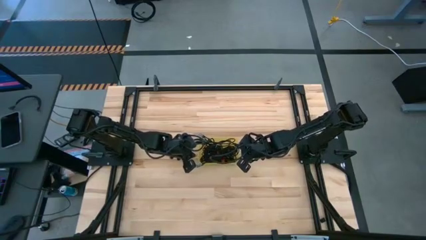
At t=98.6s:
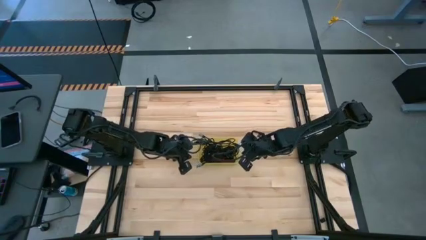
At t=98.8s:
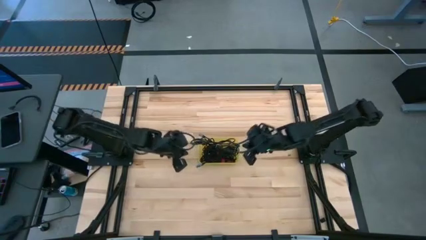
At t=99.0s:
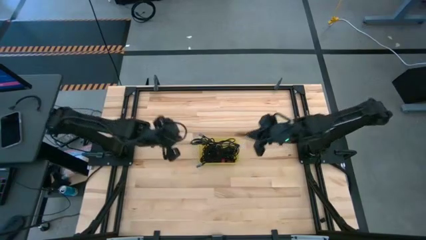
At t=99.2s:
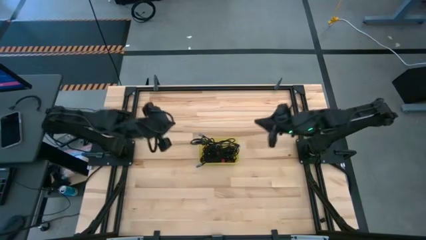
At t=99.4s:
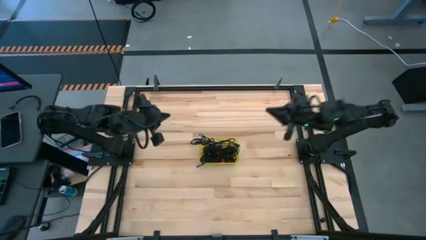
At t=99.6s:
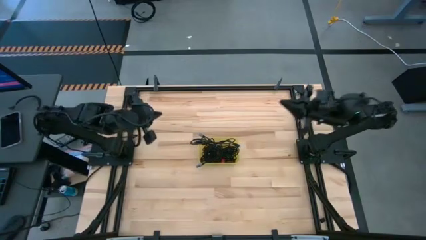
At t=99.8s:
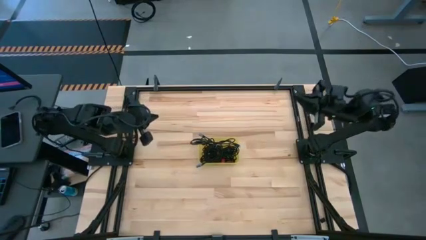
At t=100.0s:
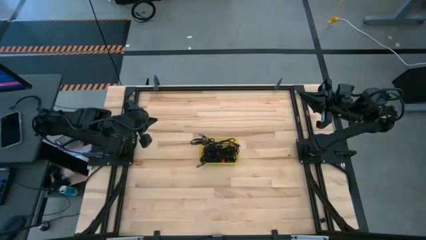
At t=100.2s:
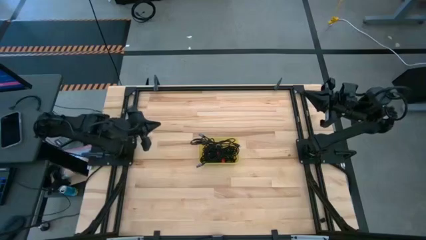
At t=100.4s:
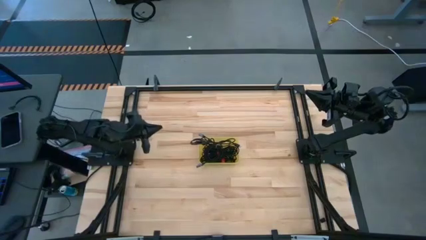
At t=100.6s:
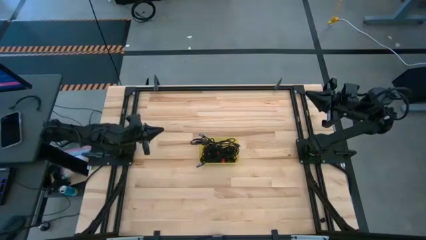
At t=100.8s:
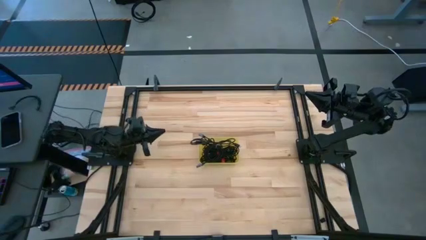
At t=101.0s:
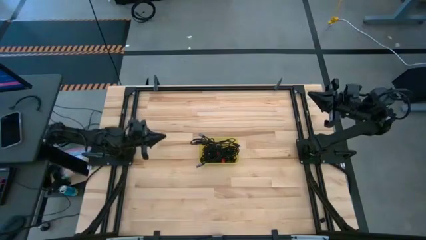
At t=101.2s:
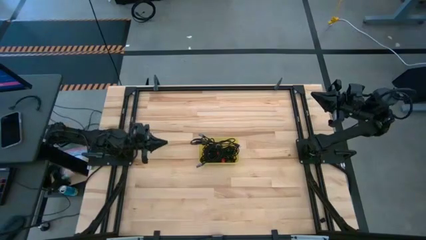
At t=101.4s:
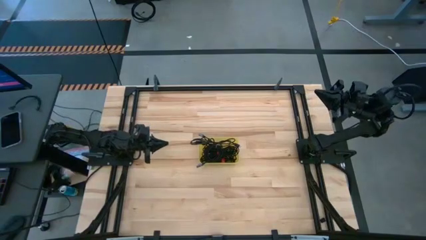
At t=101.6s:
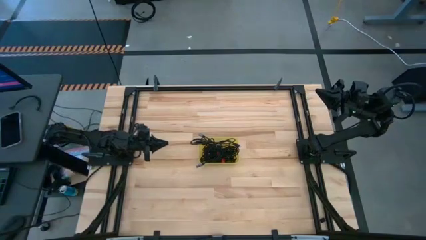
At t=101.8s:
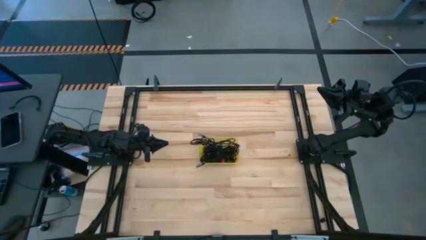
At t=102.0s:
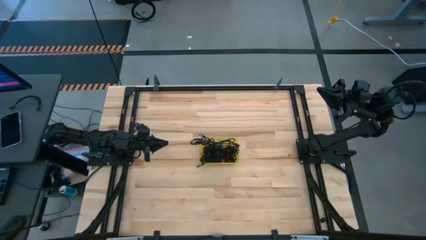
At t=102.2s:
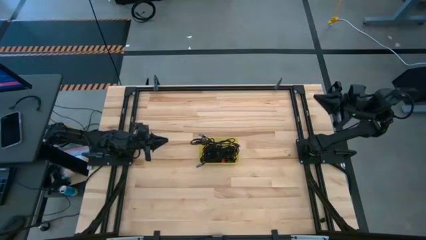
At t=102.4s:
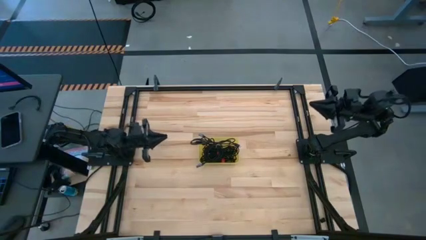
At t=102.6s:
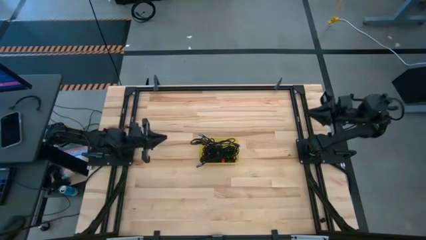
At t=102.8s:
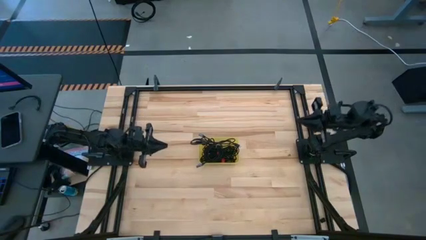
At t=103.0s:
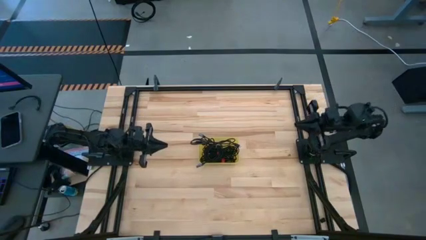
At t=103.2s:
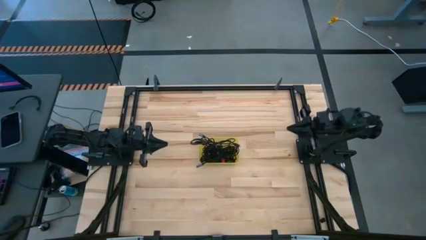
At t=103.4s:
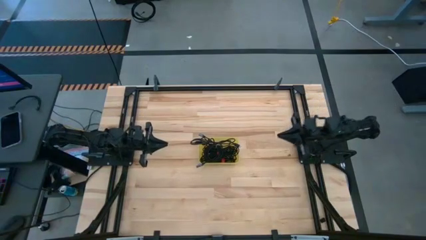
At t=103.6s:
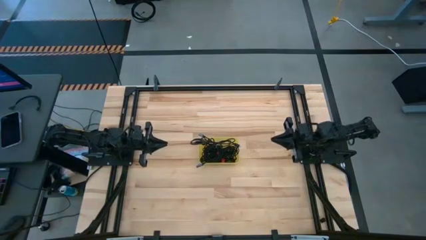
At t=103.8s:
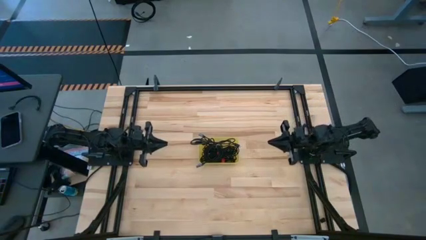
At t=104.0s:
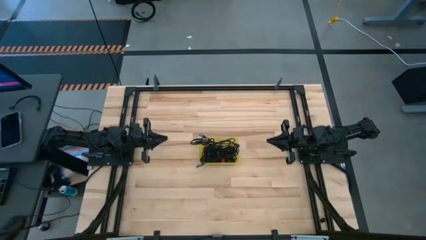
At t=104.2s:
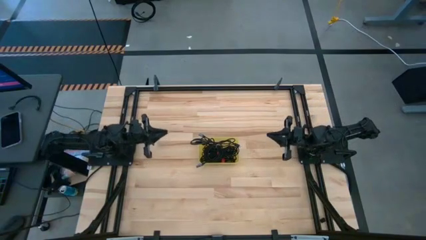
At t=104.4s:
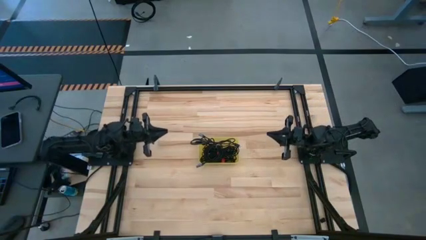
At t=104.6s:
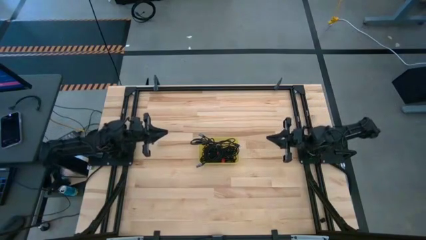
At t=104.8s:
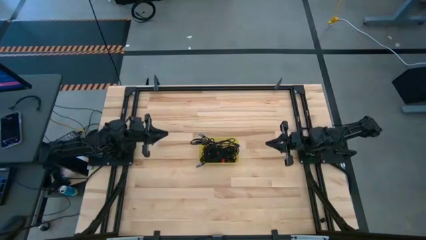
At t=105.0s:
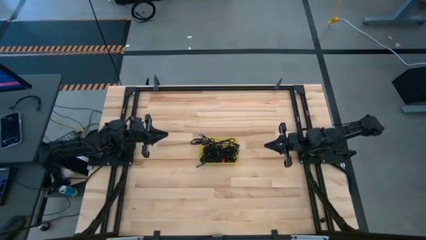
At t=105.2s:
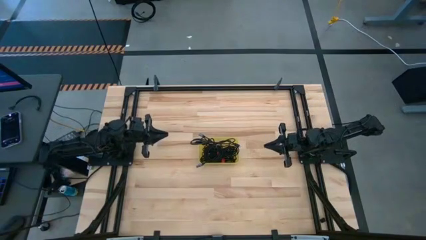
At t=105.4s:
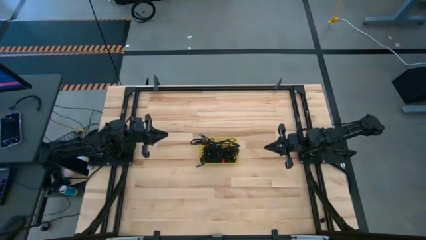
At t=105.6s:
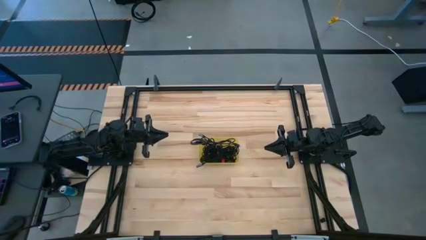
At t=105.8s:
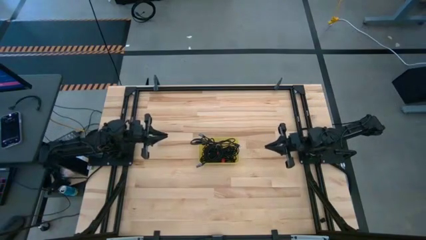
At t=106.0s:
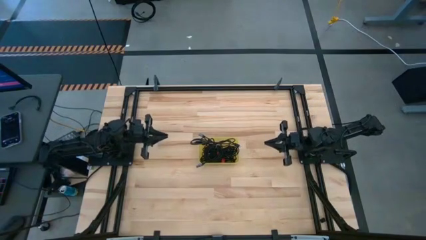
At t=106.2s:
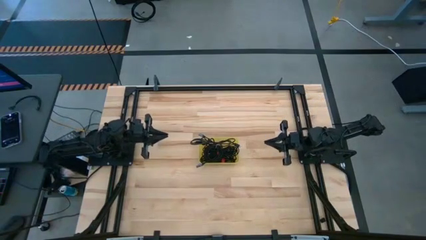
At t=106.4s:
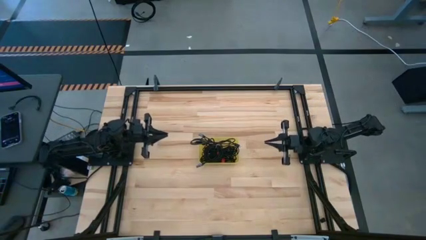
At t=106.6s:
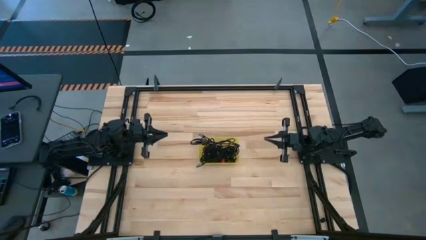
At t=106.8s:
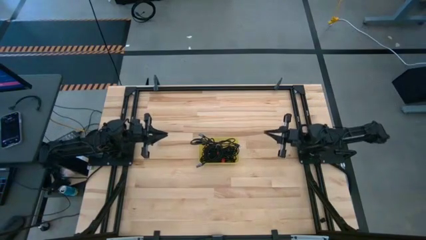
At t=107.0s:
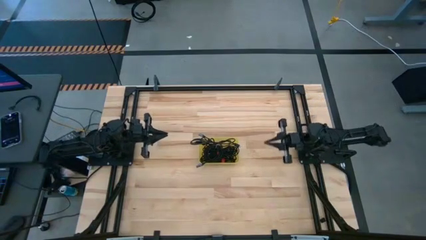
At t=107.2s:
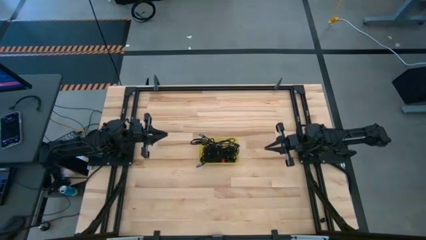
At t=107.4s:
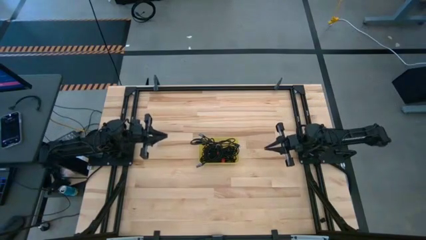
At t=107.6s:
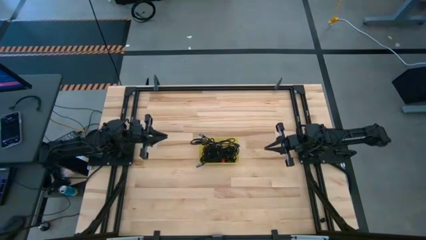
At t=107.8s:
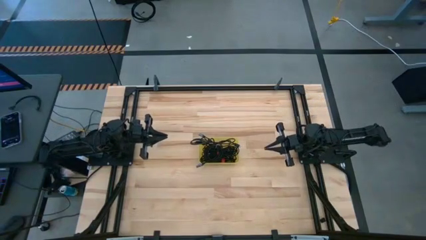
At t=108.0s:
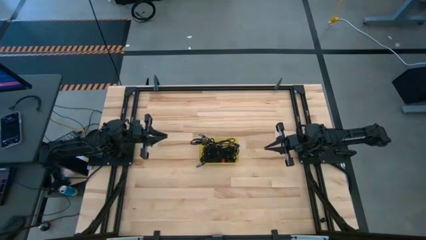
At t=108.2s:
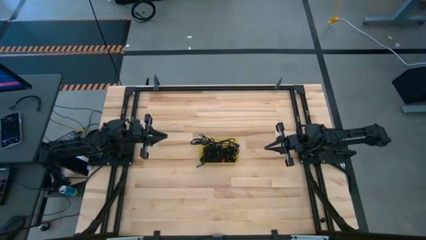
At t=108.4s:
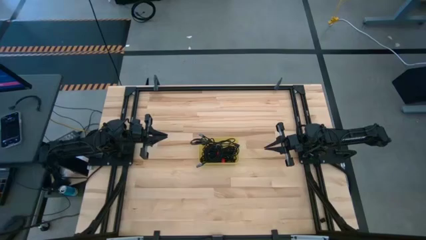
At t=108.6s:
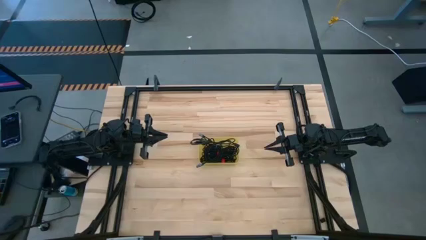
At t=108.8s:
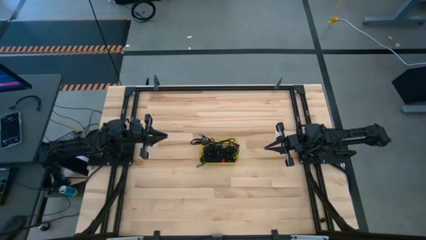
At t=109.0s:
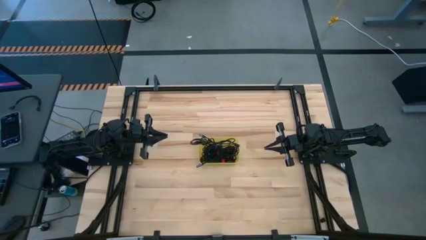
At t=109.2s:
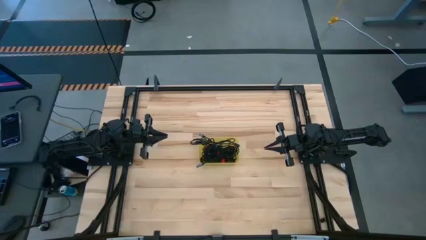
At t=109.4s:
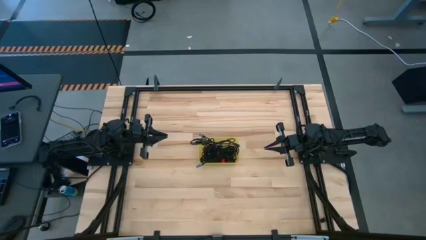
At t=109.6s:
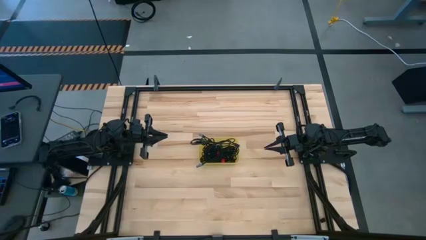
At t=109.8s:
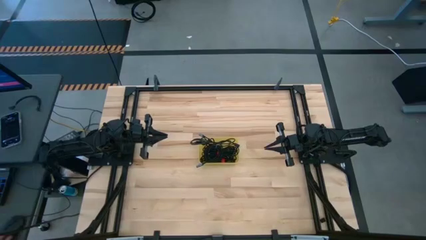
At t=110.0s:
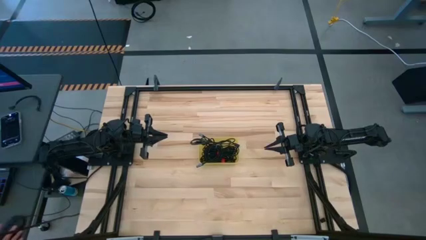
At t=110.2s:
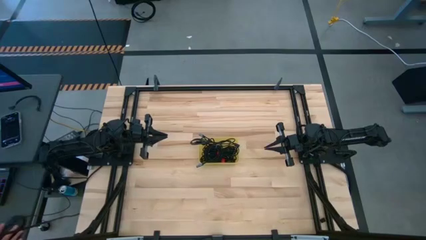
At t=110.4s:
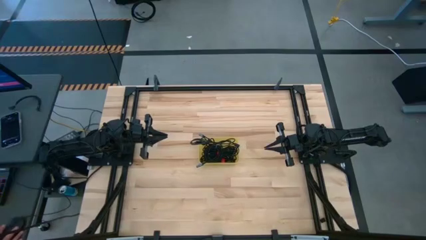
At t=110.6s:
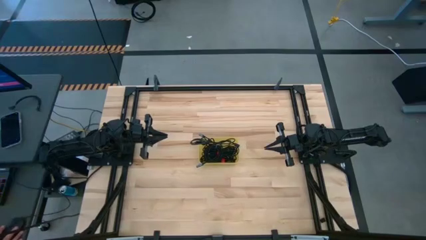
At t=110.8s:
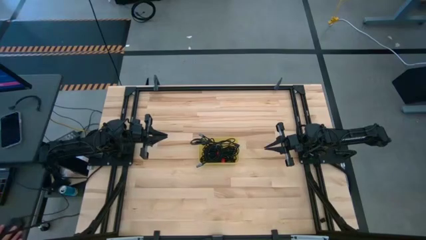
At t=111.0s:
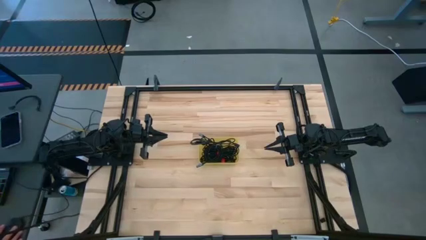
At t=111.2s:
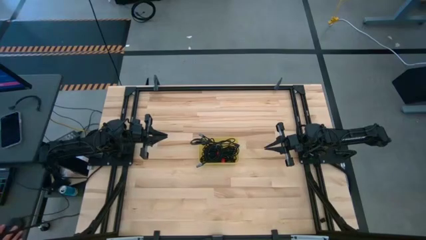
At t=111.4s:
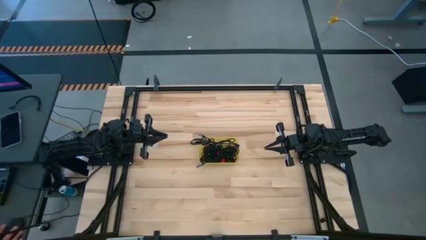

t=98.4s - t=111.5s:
Task: Pick and place USB-C Cables
Return to Home Position

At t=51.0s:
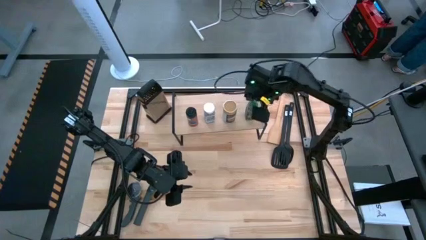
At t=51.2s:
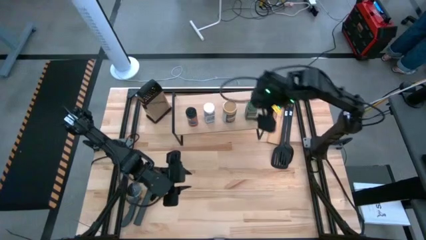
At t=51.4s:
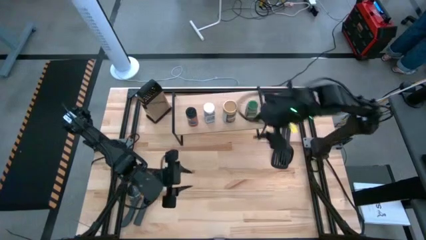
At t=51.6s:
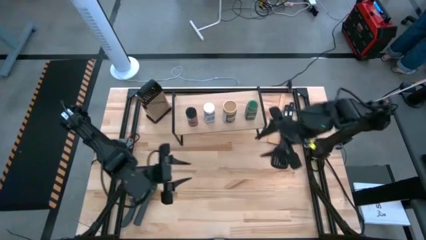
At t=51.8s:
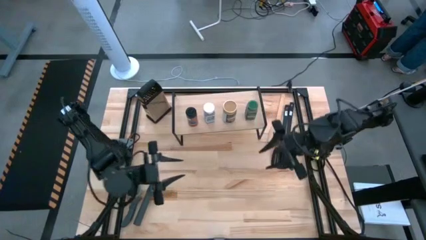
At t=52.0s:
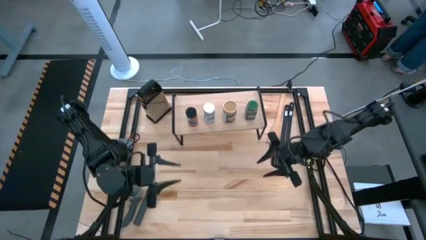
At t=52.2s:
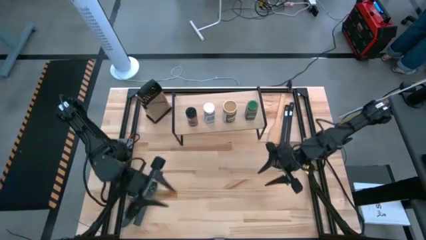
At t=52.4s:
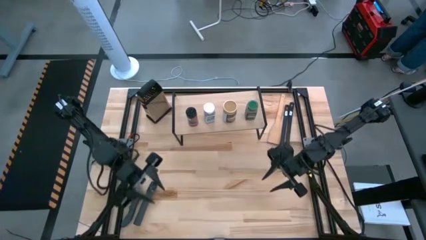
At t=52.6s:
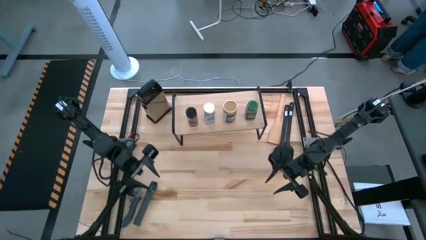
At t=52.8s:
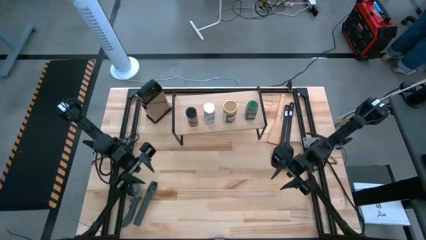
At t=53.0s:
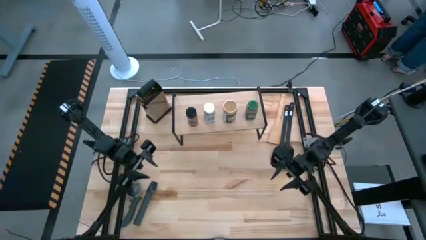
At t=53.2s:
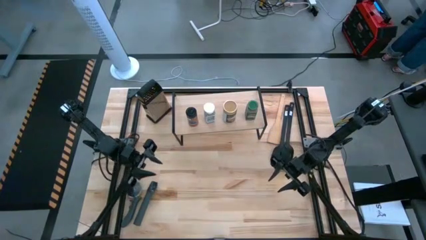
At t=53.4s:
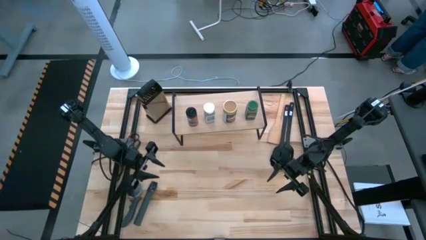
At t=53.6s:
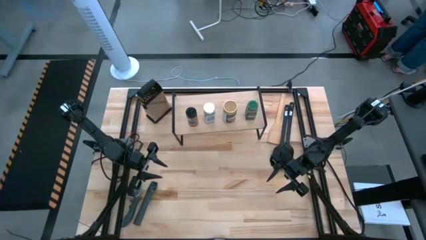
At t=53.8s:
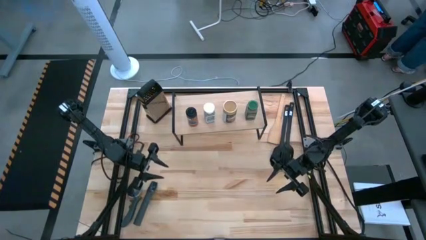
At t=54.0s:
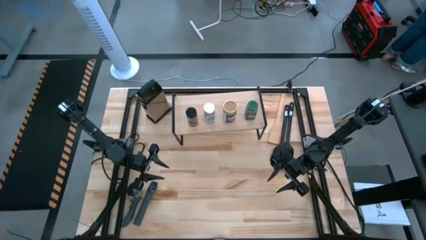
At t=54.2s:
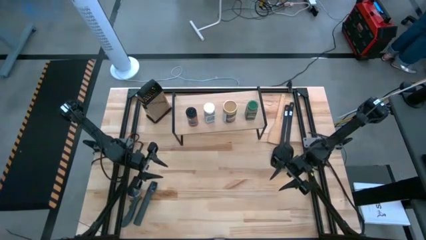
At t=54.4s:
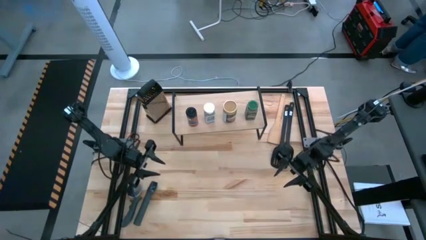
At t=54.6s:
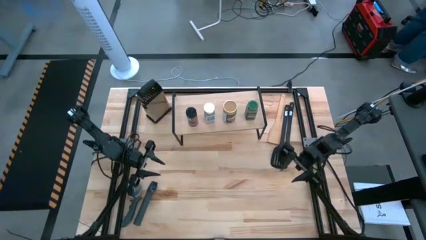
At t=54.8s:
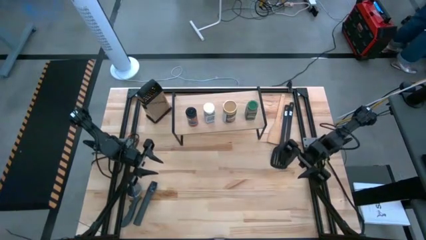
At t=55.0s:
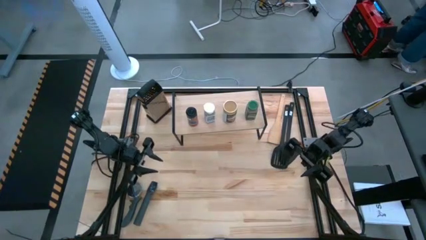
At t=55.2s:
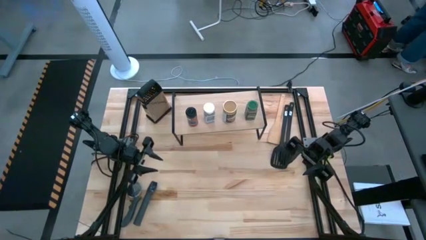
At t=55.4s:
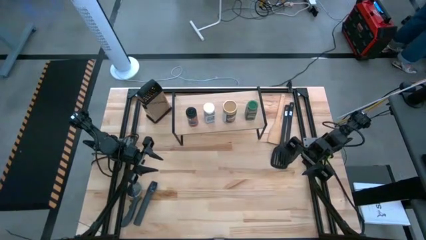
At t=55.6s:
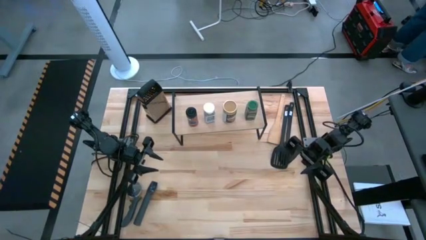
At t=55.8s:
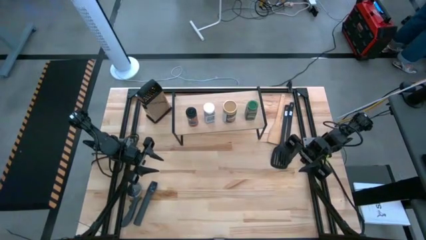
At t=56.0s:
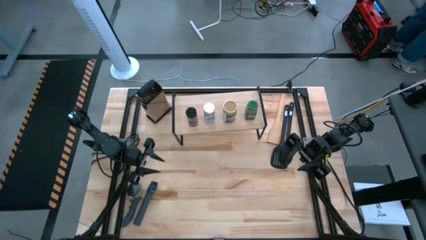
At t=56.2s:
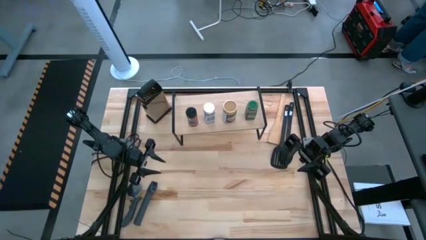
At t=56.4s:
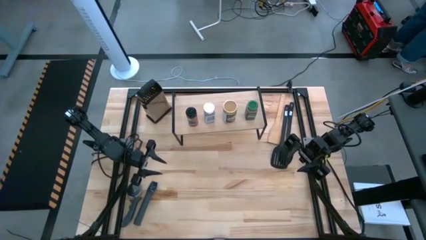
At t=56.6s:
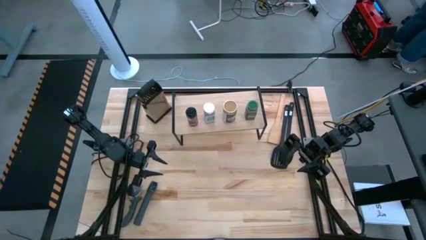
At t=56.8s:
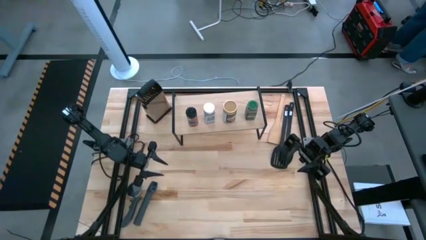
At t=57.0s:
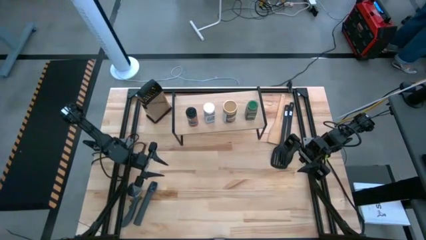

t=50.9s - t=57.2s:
Task: Shelf spices
Return to Home Position
